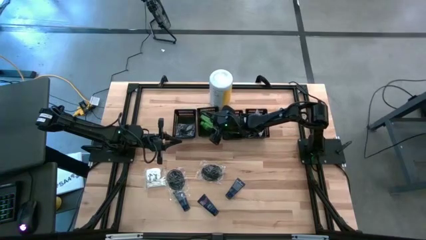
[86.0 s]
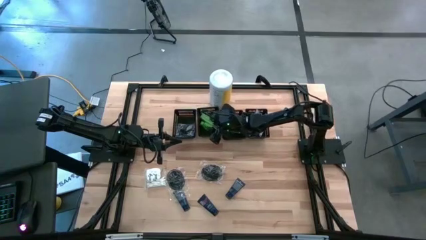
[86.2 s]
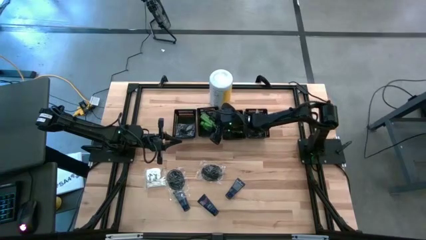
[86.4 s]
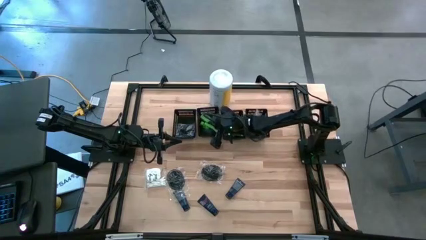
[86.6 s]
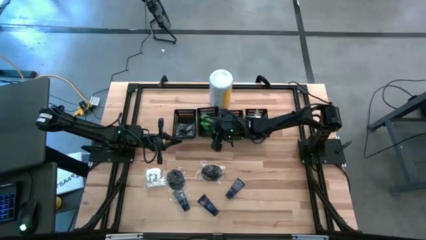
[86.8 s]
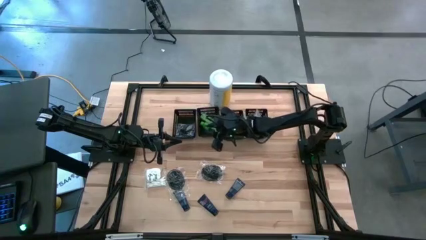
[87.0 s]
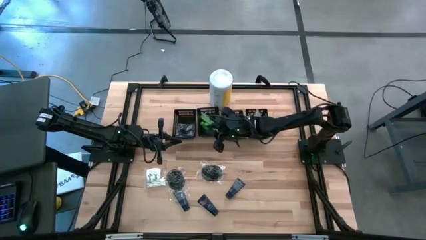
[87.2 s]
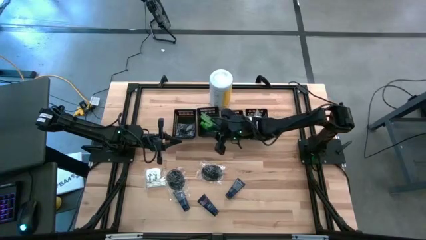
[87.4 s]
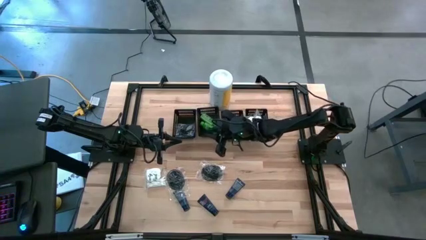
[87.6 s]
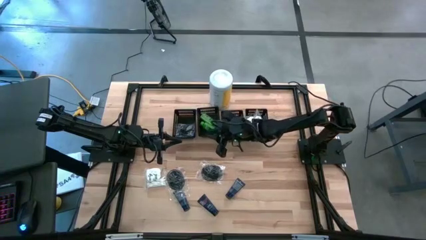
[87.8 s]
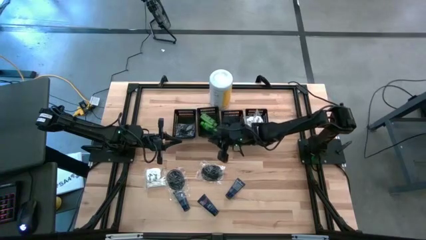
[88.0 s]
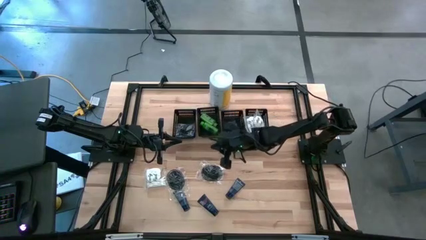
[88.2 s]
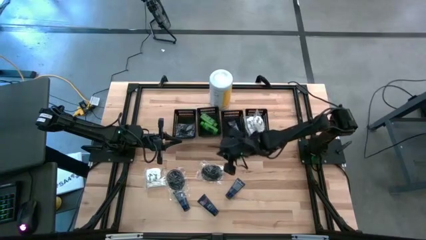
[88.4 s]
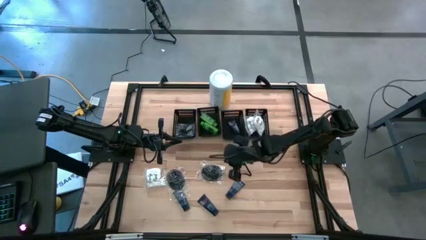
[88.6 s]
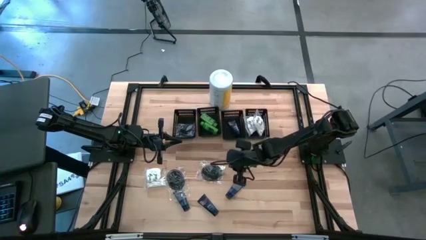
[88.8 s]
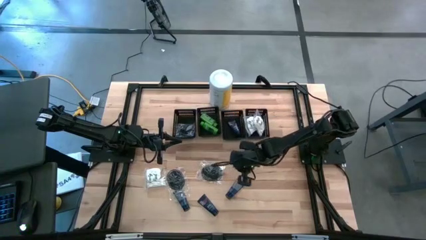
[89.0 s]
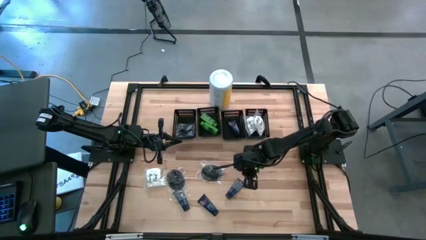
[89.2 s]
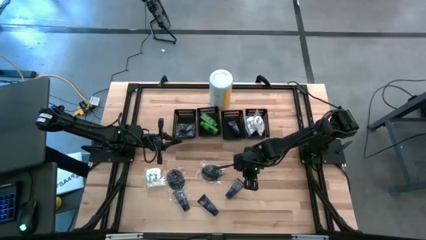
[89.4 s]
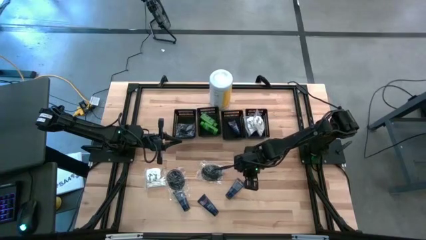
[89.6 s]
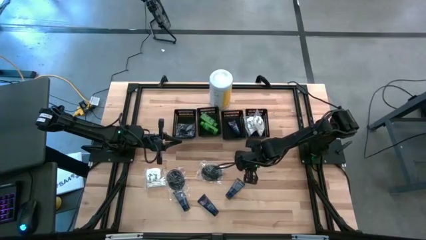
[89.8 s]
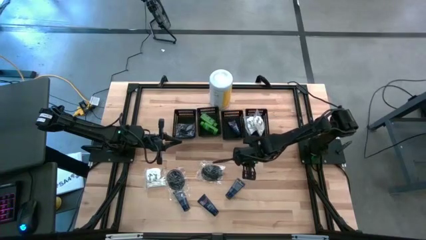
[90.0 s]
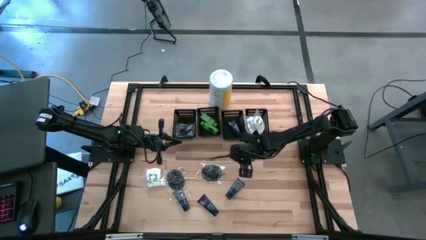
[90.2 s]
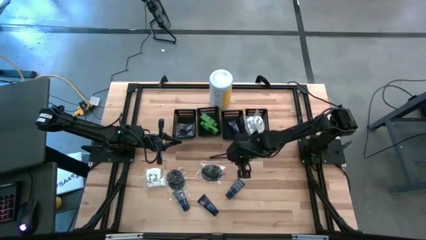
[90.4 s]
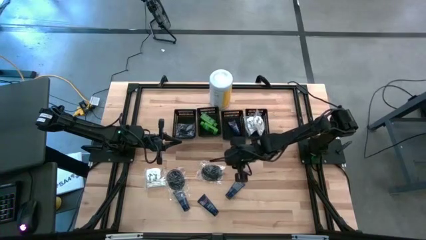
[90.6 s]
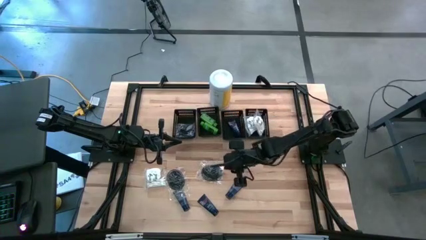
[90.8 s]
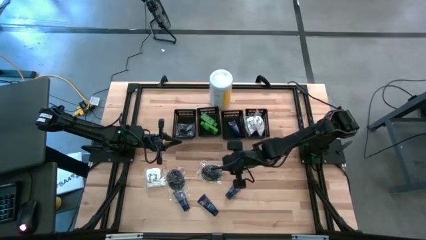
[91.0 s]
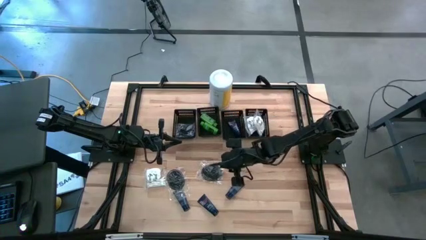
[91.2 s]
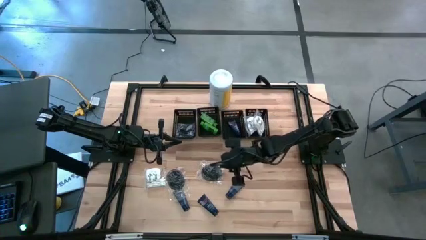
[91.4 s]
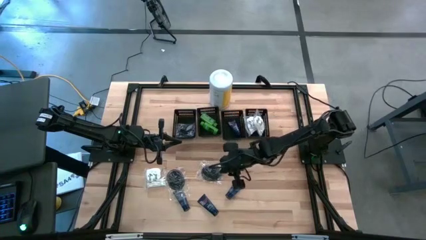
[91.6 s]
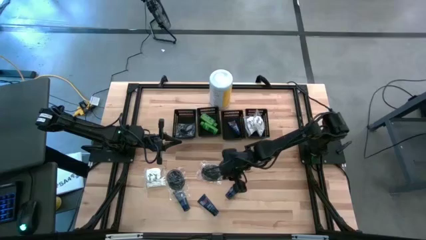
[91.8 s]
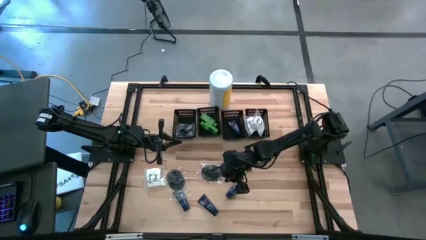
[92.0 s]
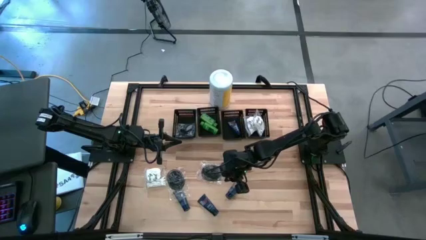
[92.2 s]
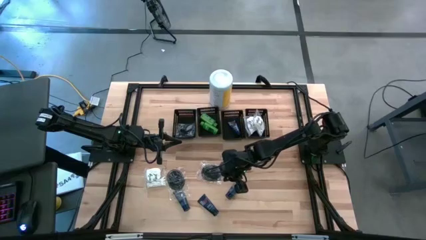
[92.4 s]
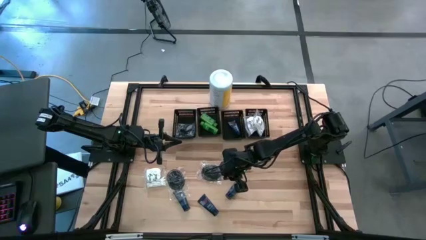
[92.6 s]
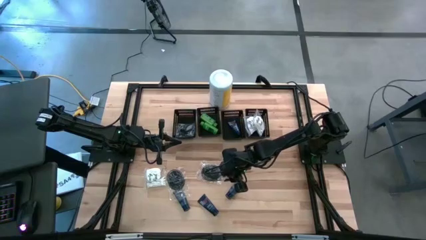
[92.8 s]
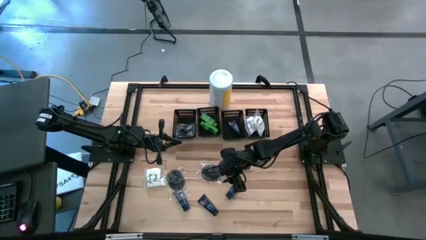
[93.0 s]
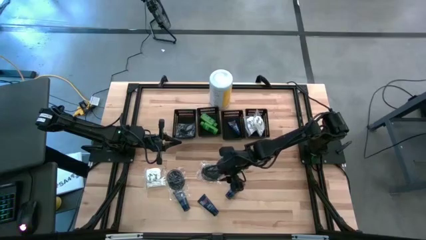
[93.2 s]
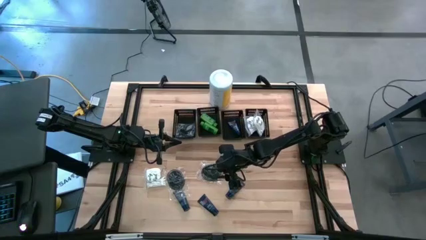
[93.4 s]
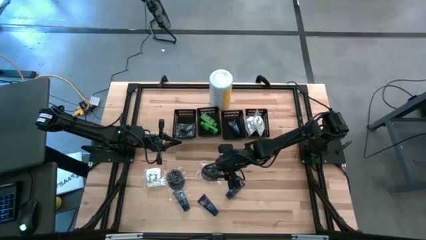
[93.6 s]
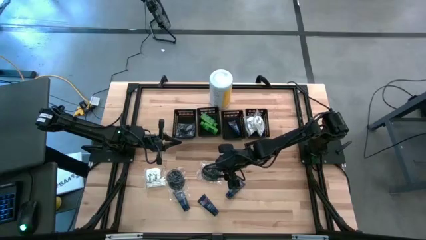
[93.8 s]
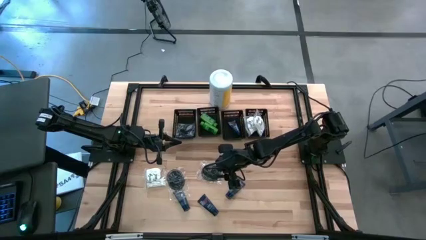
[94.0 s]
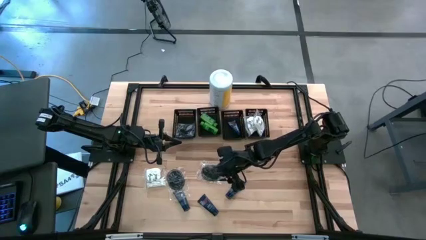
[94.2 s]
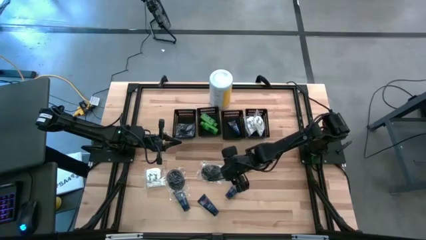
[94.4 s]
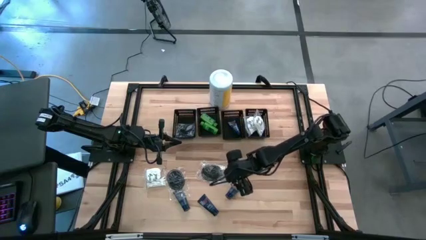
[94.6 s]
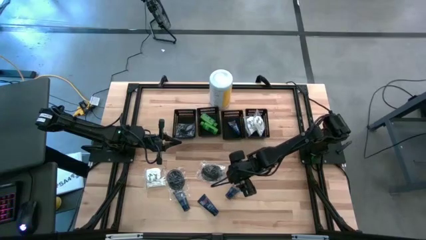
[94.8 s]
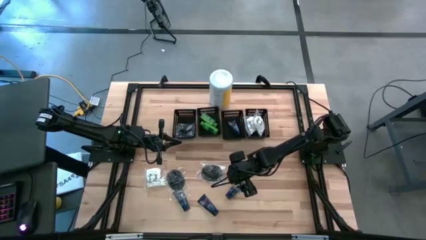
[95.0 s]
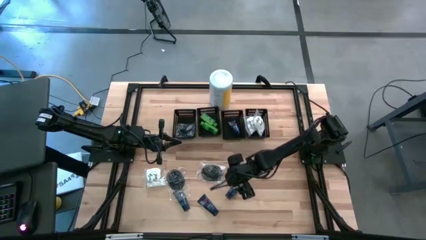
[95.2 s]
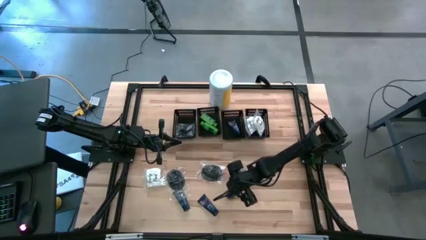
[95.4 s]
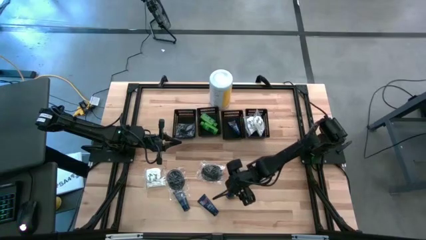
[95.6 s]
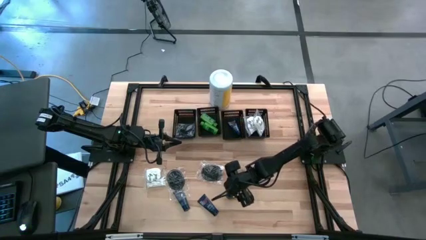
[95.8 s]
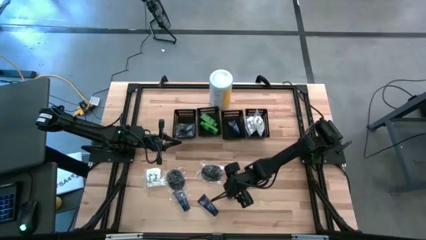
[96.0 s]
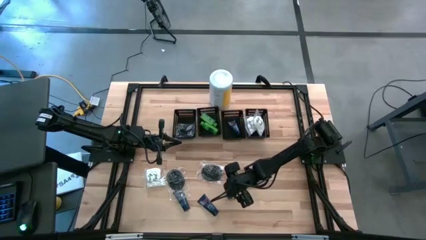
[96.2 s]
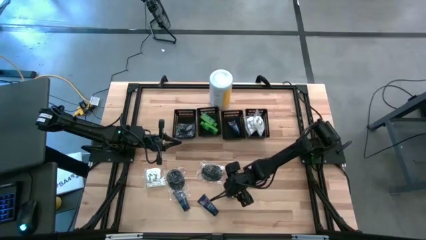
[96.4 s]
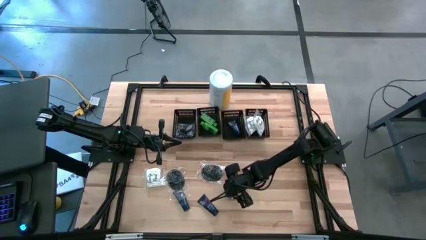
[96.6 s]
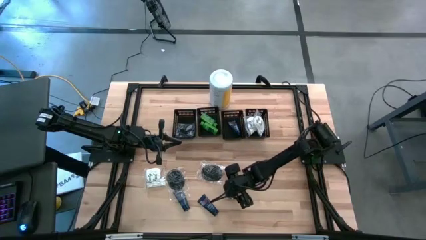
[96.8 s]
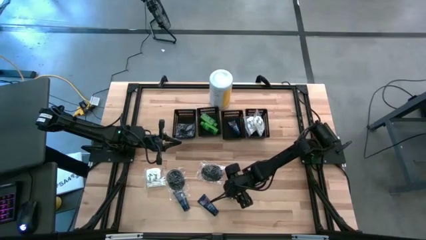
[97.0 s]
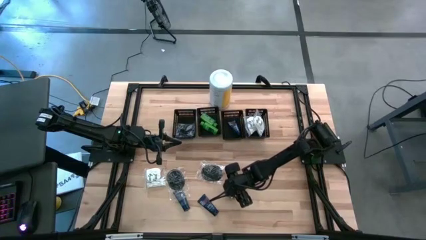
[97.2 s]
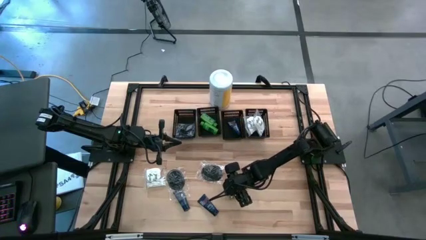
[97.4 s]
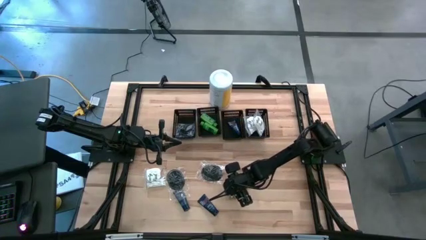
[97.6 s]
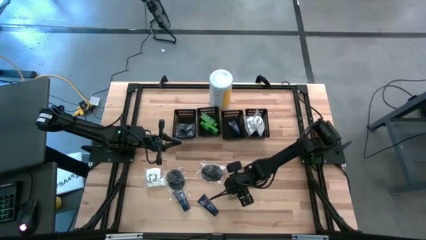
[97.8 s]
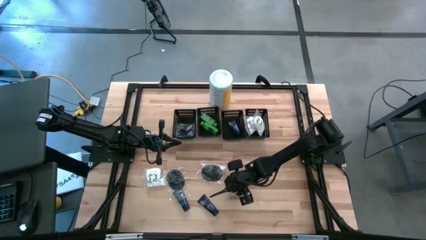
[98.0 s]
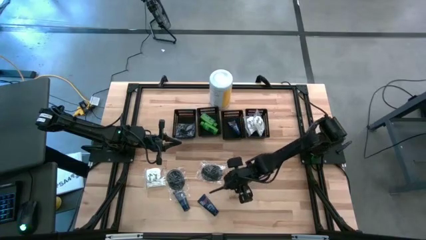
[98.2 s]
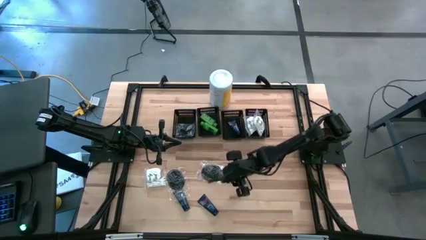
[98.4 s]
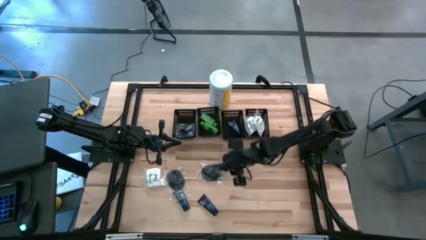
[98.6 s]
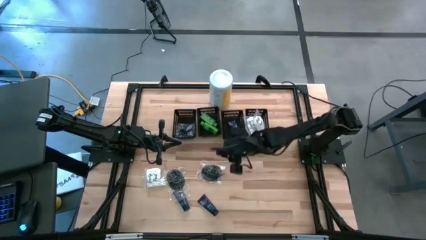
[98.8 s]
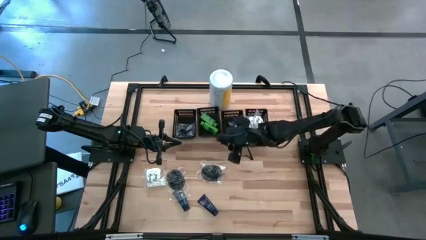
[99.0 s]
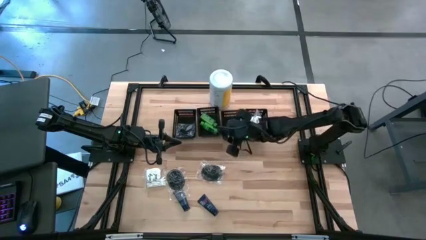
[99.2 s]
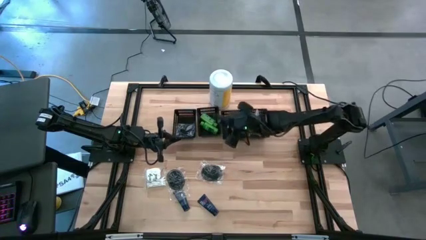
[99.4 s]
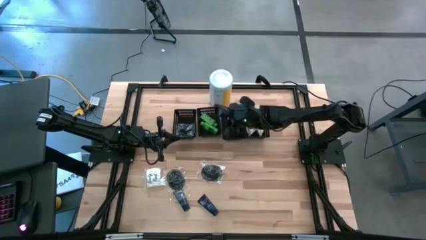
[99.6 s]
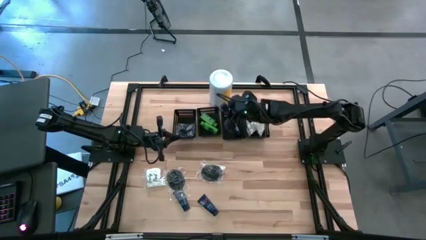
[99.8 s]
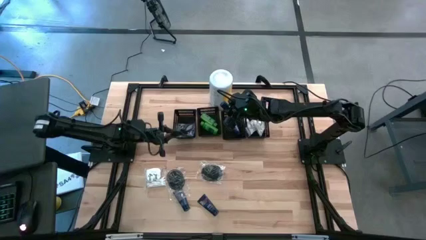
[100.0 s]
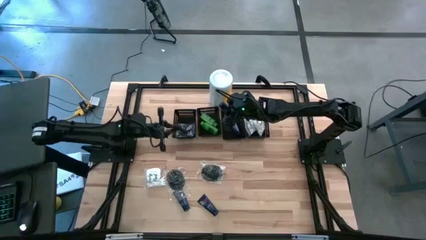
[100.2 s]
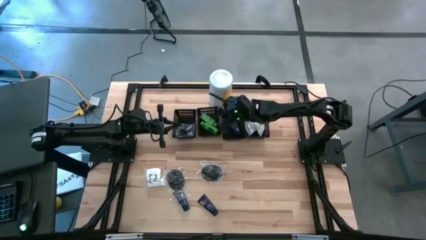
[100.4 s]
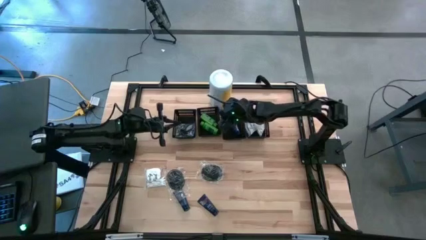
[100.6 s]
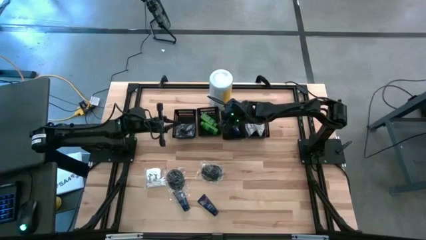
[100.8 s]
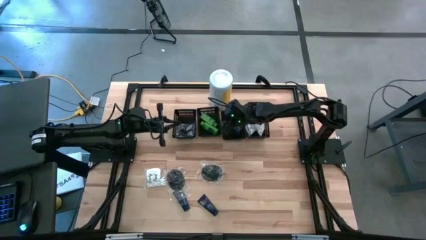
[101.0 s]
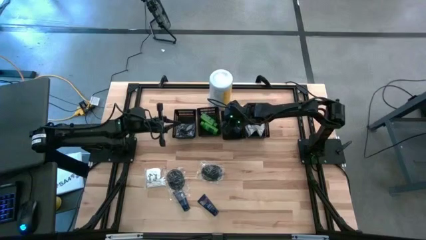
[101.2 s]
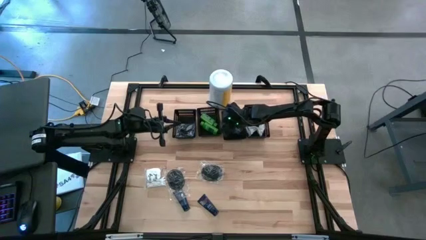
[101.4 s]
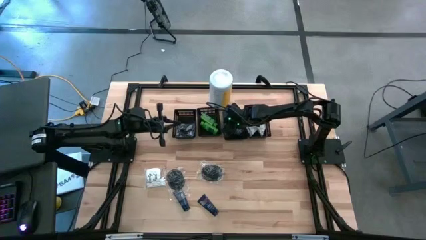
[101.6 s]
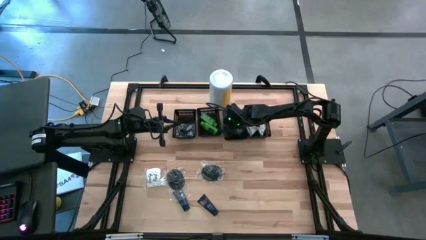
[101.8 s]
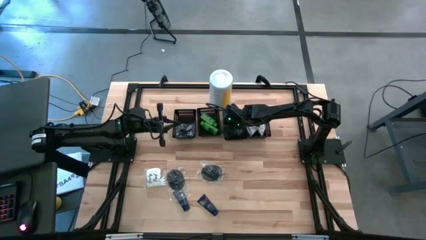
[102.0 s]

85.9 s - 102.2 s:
Task: Pick & Place Travel size toiletries
Put the right shave cream into the middle right black bin

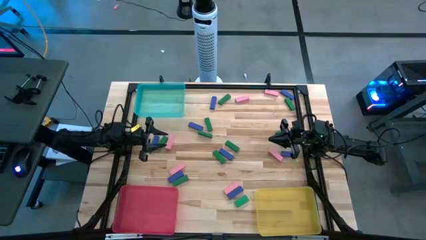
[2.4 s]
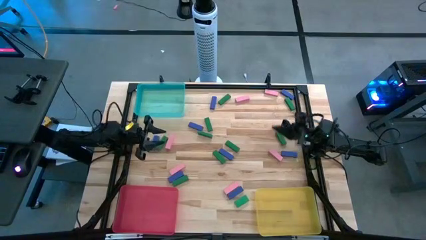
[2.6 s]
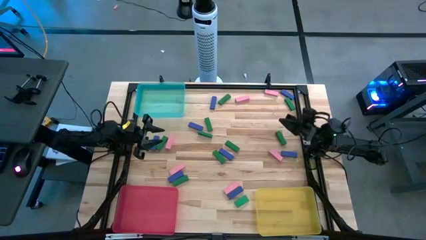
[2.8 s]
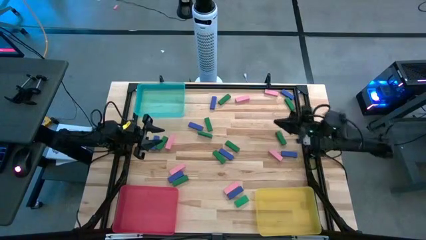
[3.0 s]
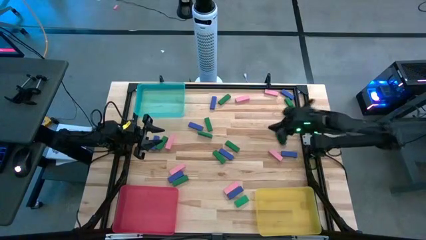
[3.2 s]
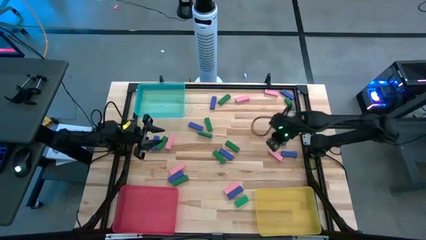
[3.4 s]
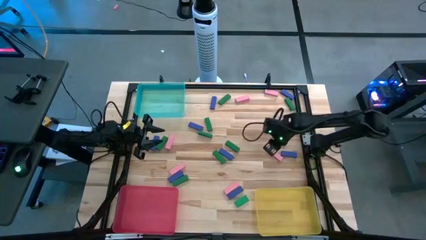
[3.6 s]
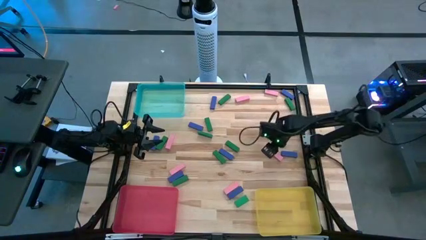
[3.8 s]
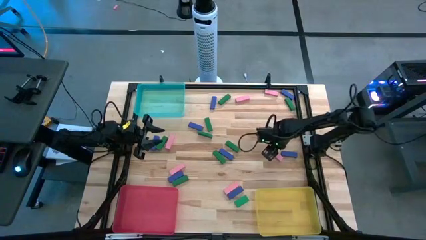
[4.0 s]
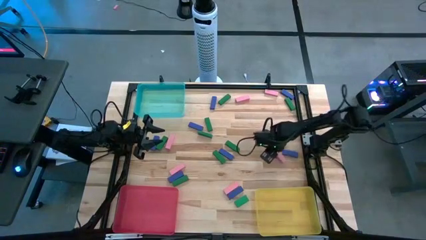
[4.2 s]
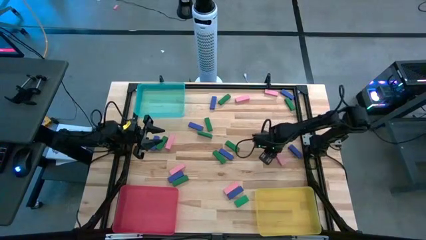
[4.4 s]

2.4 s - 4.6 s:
Task: Sort blocks
Put the pink block into the yellow bin
